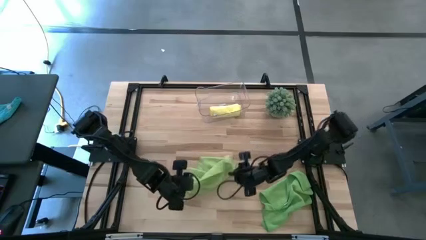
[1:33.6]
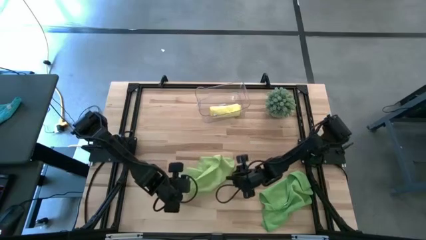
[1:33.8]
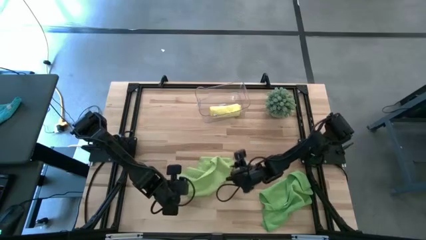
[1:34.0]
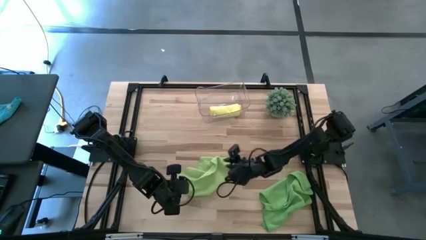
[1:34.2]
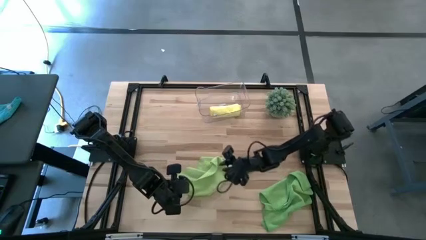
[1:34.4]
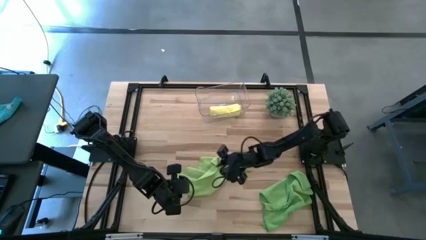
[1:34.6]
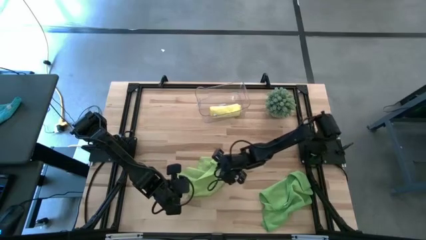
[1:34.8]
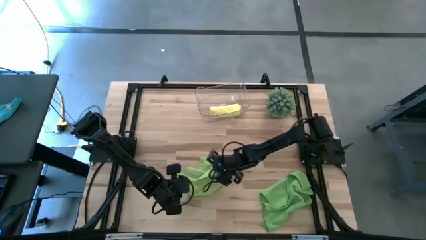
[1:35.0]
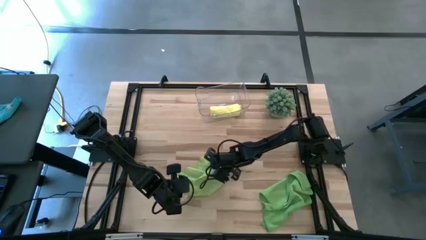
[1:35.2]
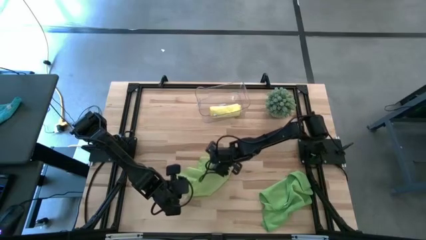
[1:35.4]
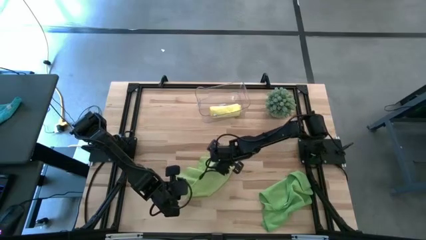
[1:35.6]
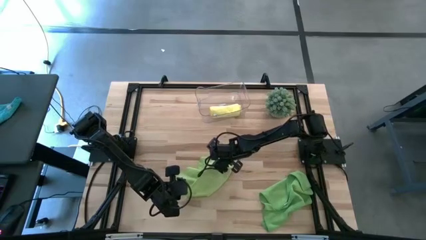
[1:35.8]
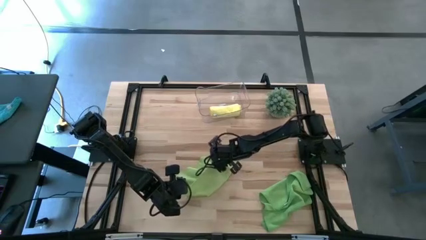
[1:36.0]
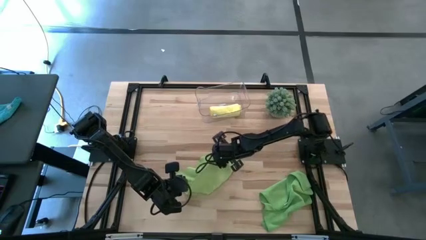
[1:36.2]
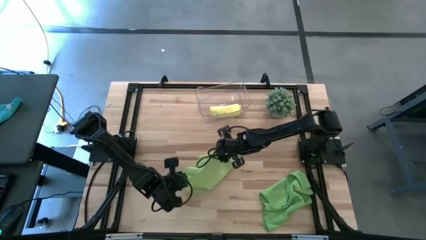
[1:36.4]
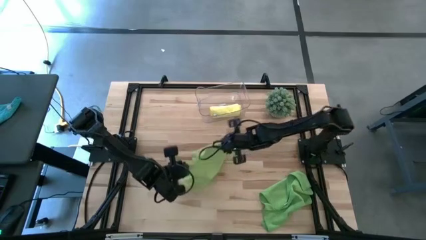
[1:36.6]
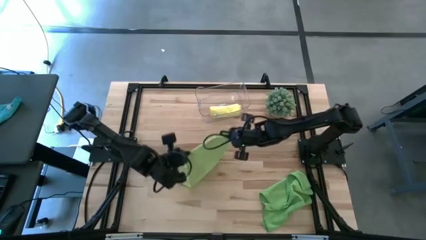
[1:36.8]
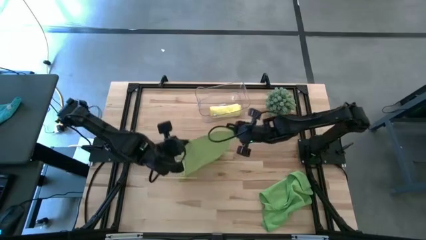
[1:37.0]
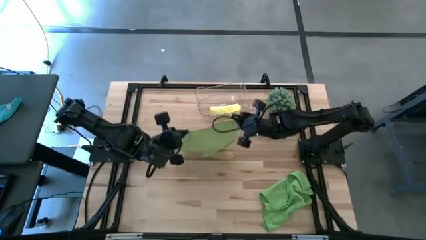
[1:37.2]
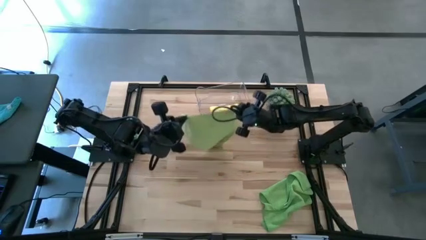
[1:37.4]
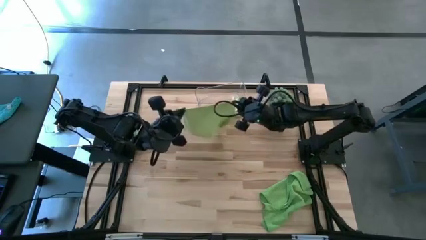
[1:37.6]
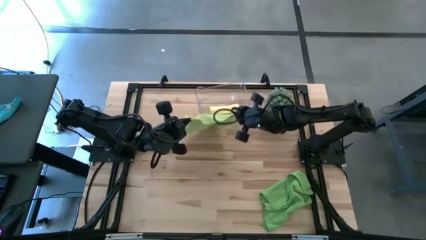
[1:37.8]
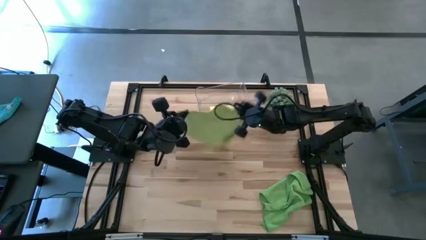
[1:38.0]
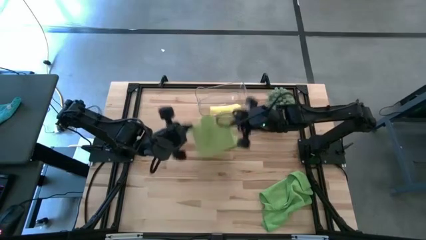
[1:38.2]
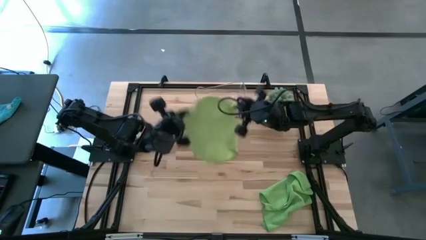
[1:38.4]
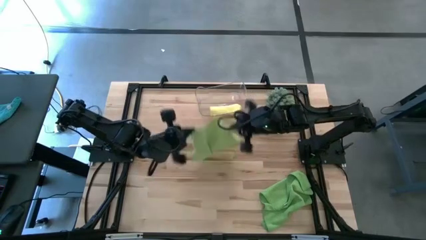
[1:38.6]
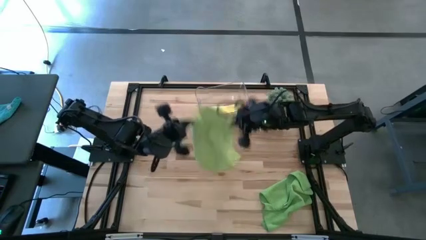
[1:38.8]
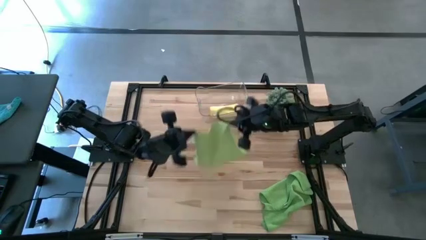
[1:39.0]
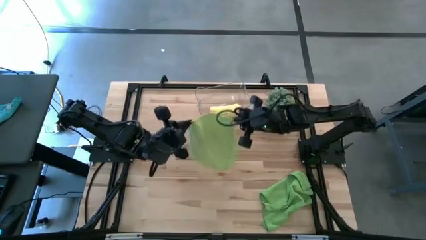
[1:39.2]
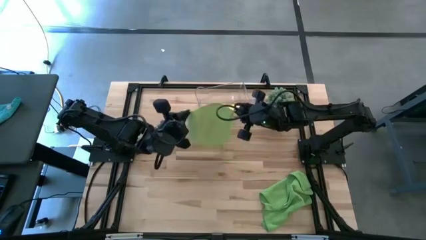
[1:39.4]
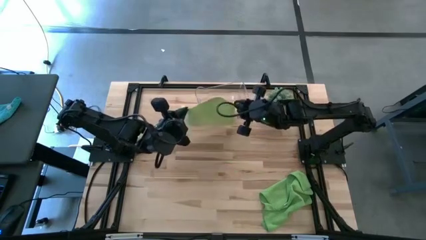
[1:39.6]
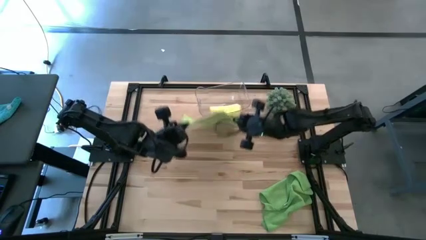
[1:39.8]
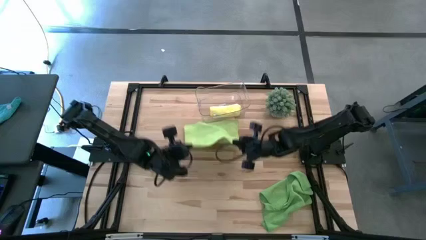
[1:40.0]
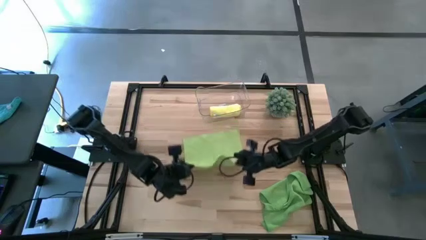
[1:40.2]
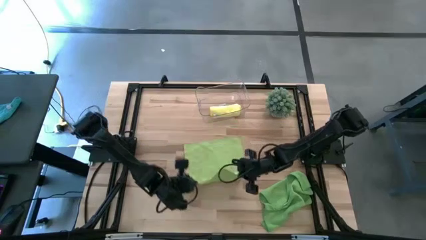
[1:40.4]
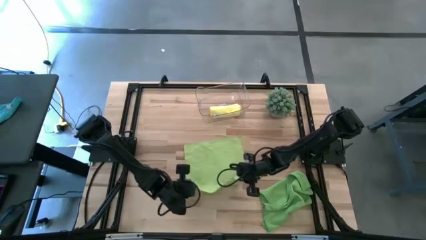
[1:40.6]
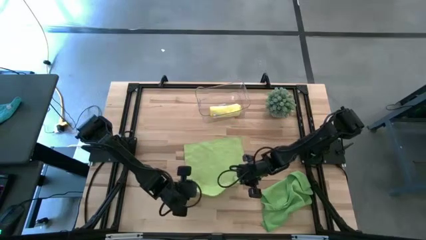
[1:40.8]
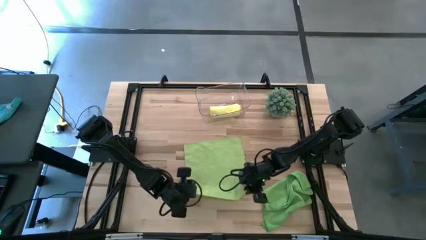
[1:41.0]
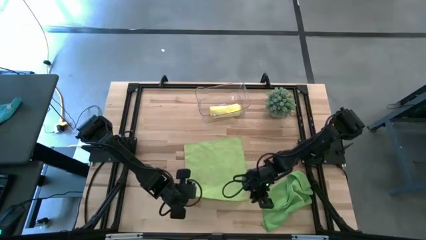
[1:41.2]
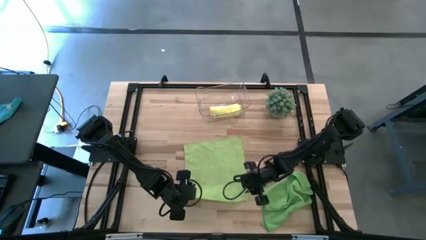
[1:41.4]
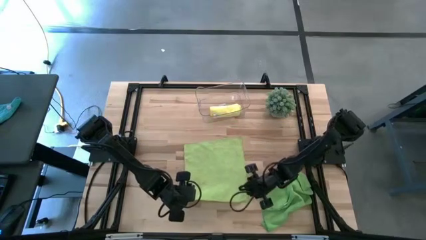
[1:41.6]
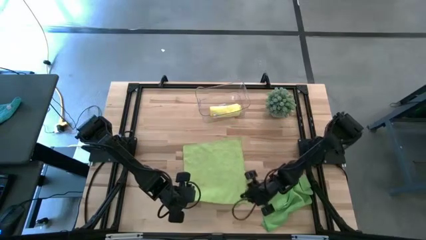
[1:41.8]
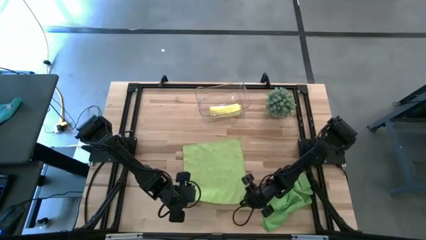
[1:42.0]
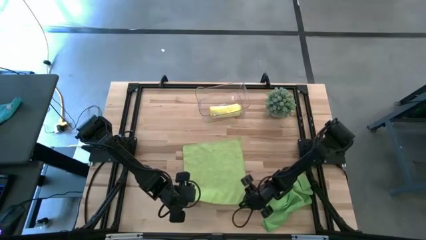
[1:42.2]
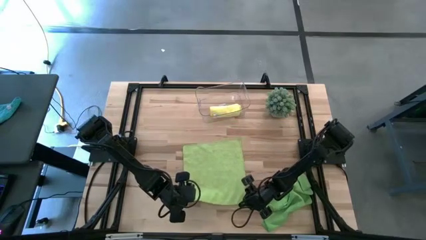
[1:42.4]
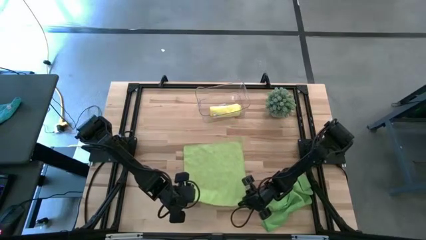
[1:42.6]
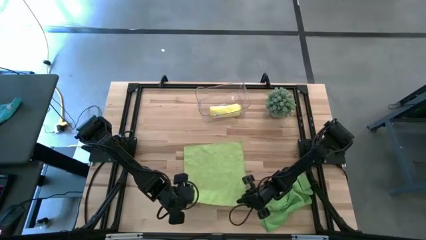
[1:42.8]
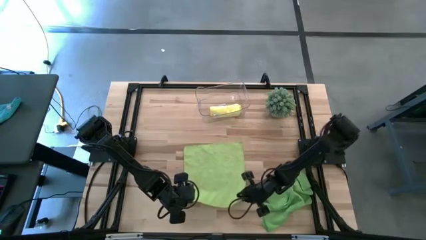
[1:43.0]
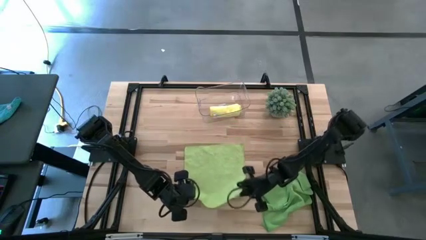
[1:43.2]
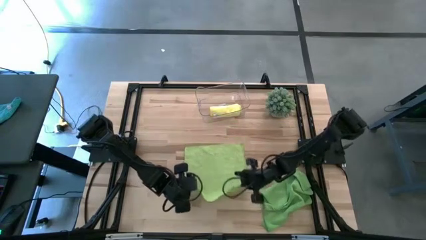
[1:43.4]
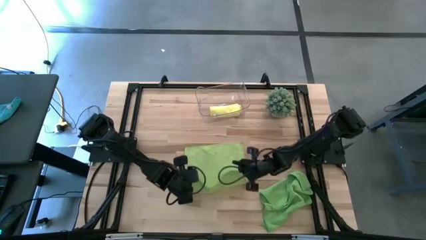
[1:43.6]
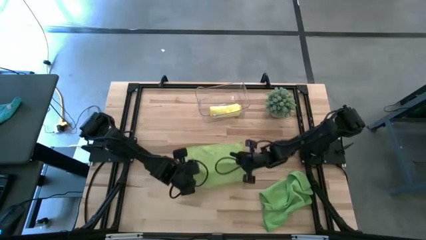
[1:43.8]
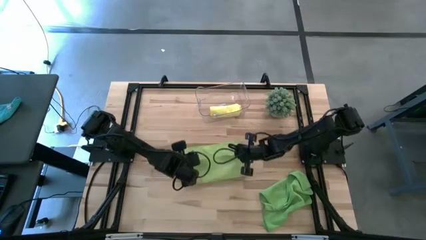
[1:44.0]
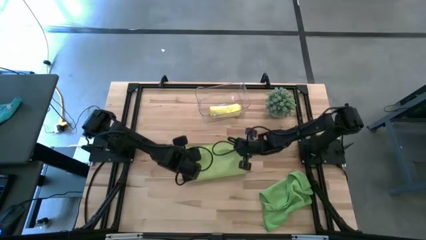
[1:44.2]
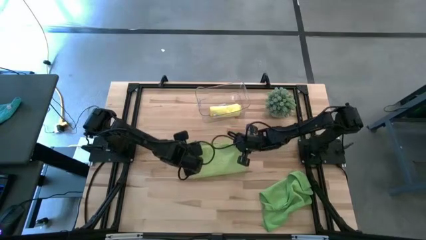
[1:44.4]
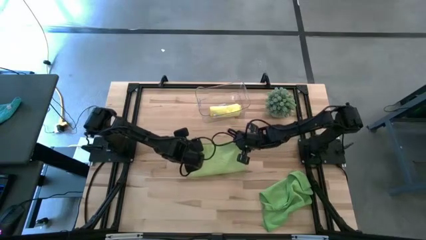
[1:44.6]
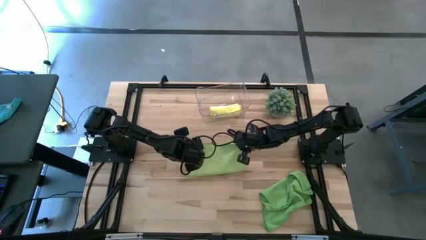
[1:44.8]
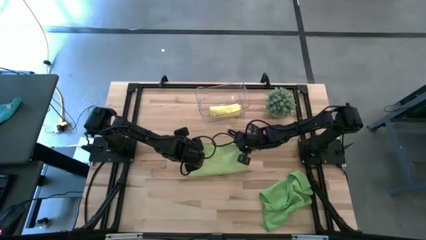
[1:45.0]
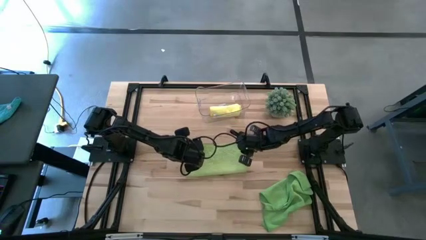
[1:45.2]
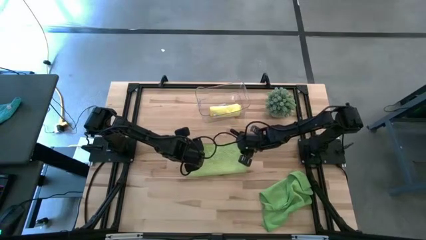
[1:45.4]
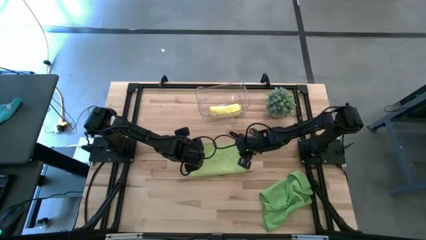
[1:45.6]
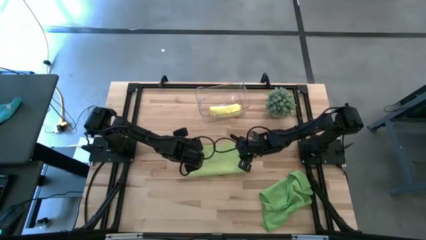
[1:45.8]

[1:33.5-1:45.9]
Task: Roll microfiber towels into tight, uniform cylinder then place into a basket
Fold the light green microfiber towel
